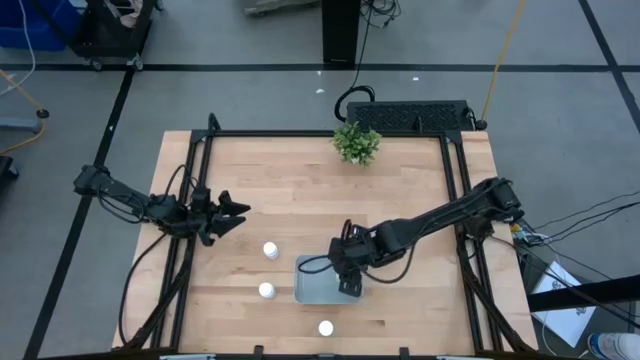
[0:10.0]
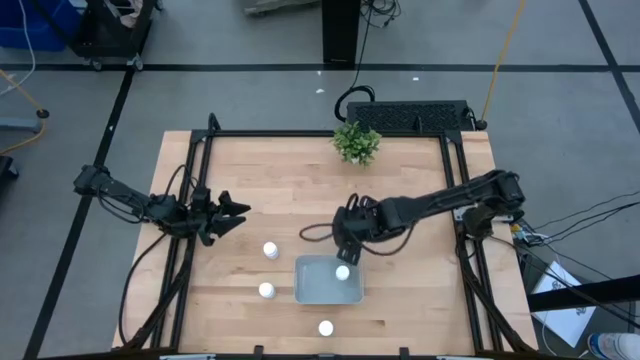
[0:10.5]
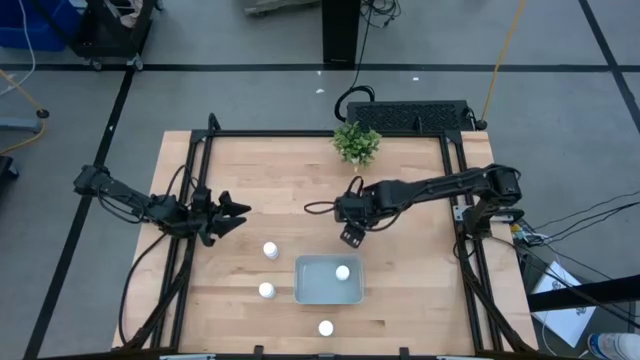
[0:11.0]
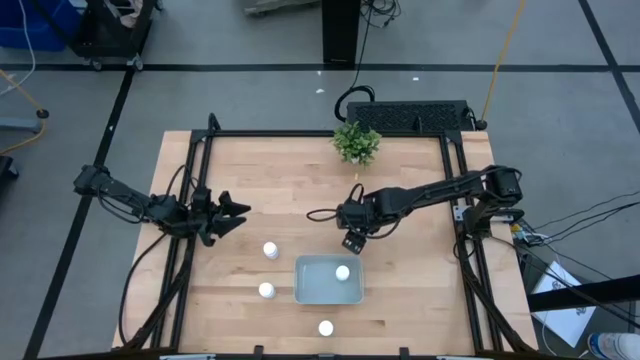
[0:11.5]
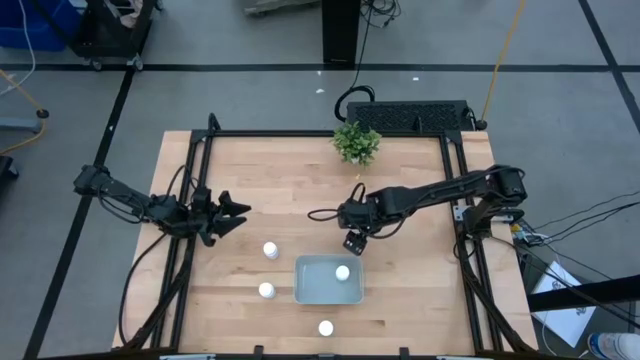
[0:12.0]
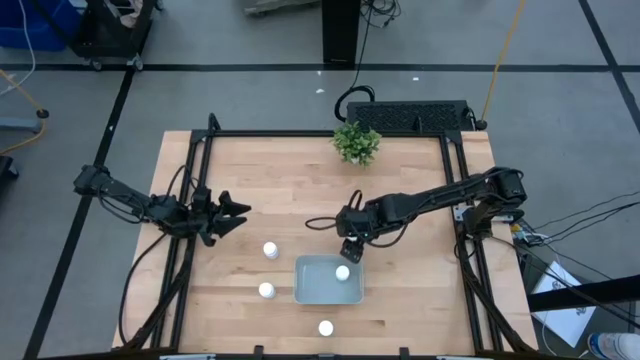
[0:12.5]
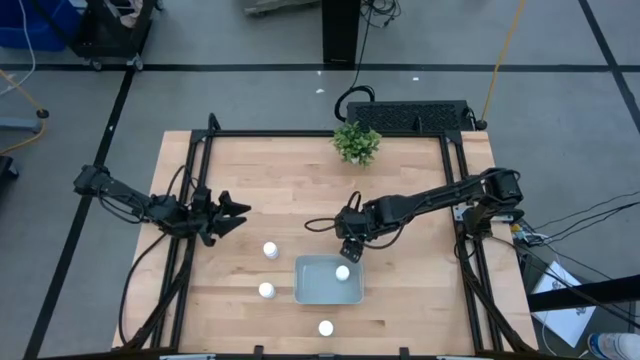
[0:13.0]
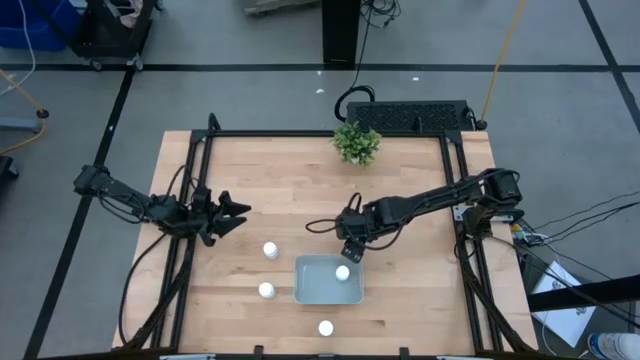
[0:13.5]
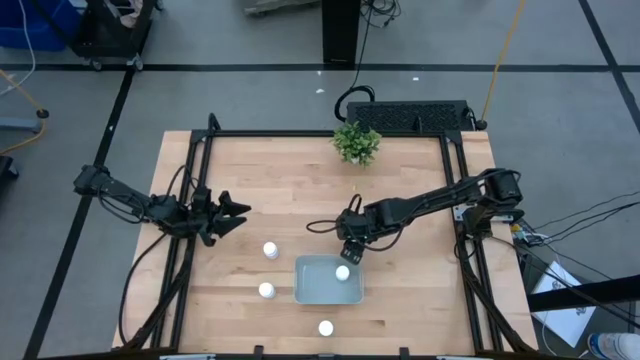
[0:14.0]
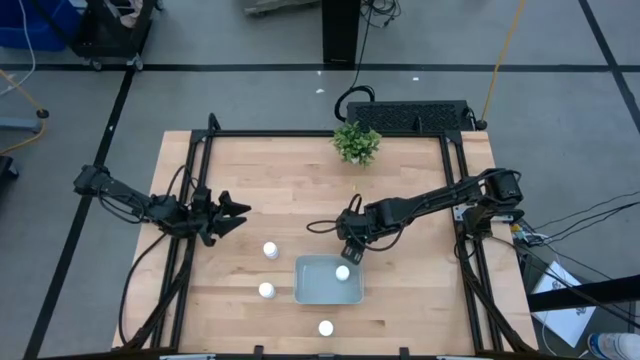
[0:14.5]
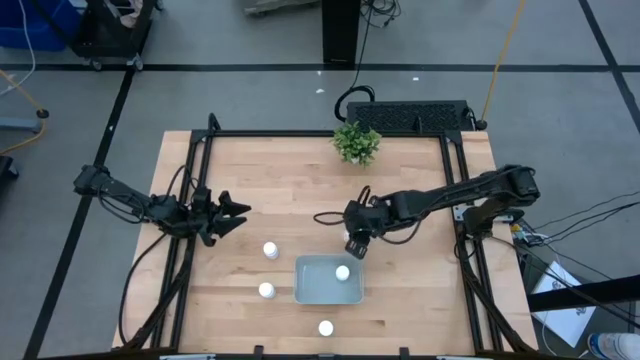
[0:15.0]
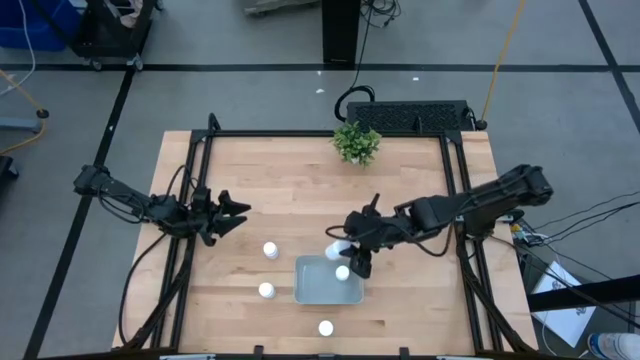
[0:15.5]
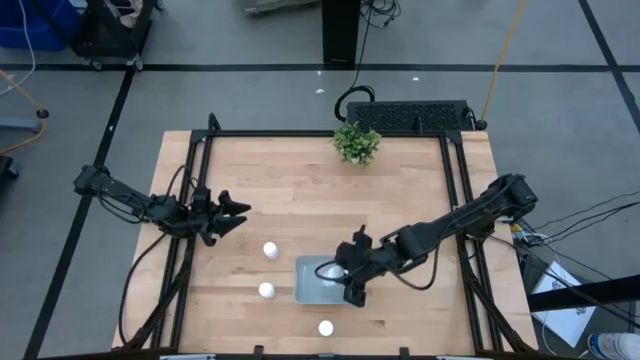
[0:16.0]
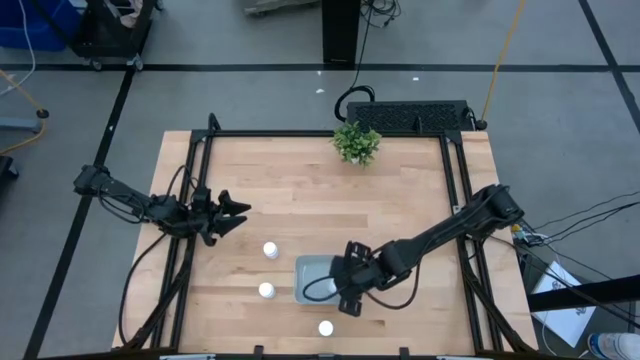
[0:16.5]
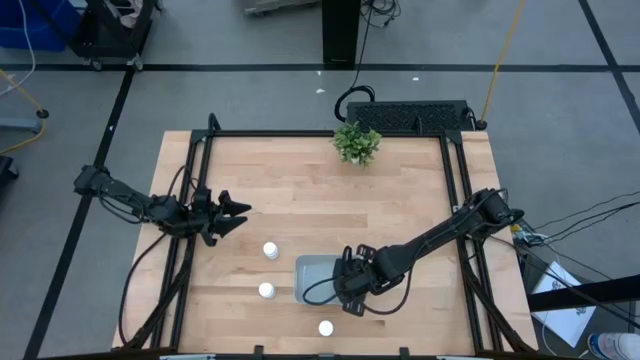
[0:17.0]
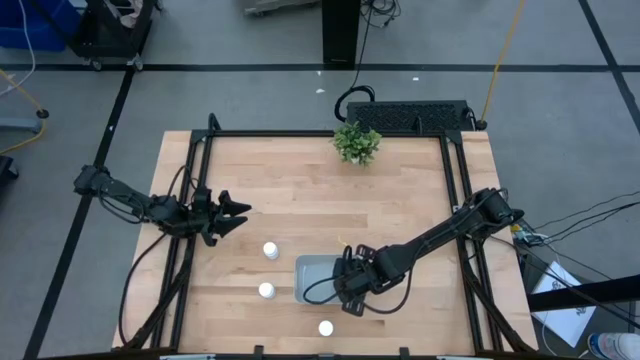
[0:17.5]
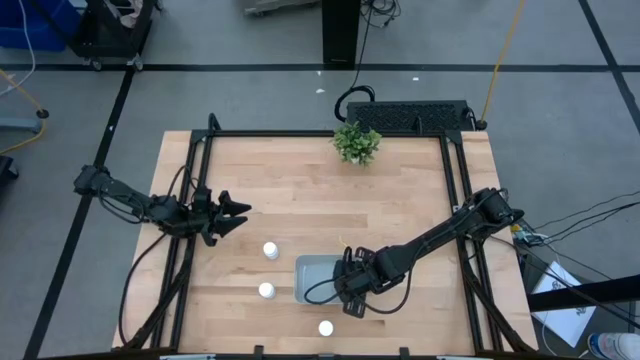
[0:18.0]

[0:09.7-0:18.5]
Task: Pick and place pill bottles into a basket
Put the white pill bottle into the gray bin

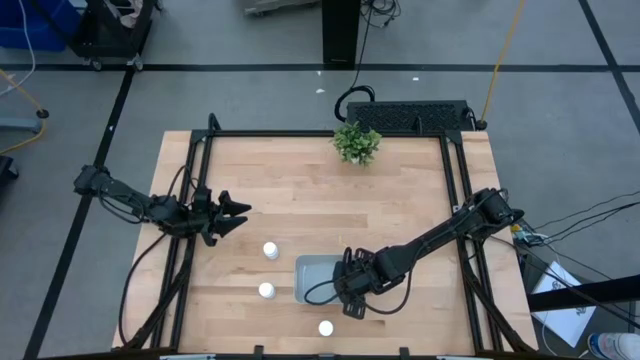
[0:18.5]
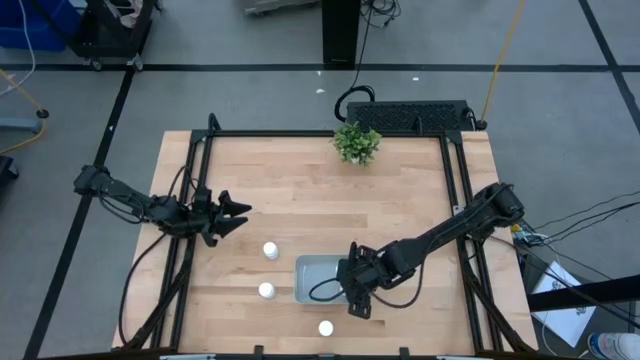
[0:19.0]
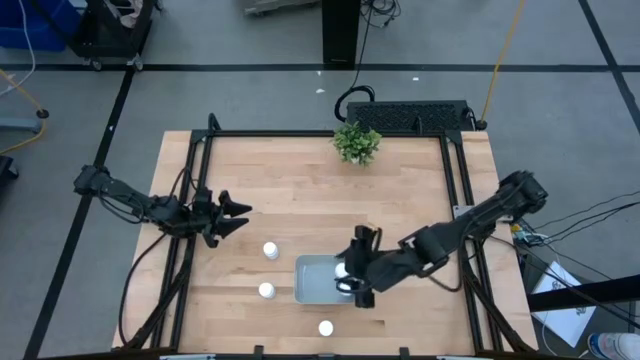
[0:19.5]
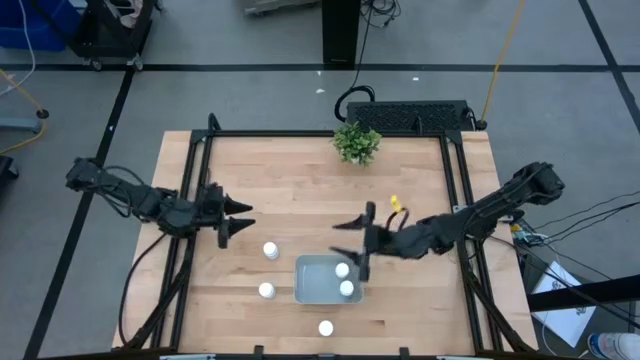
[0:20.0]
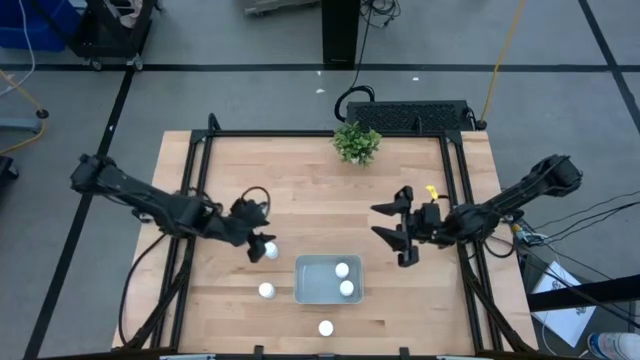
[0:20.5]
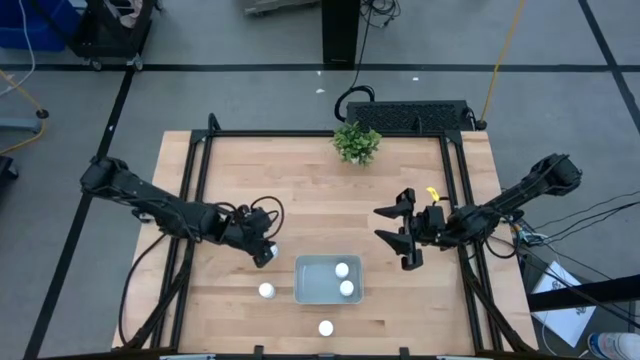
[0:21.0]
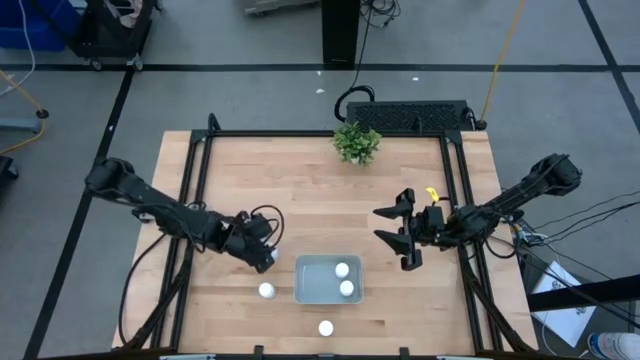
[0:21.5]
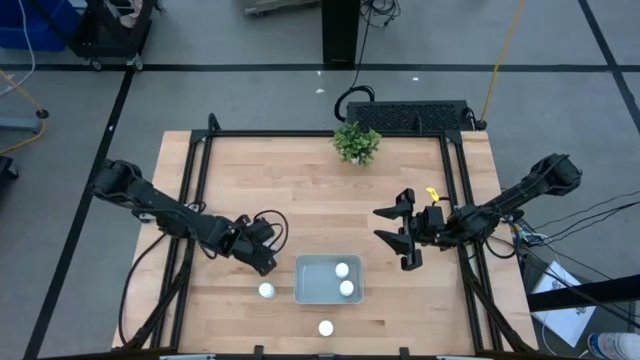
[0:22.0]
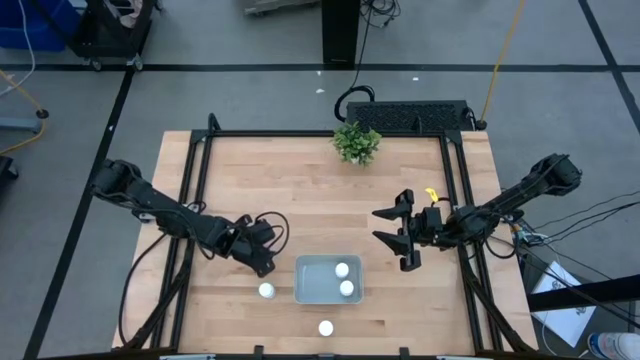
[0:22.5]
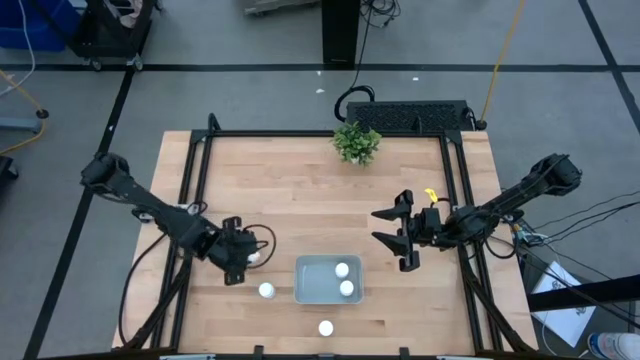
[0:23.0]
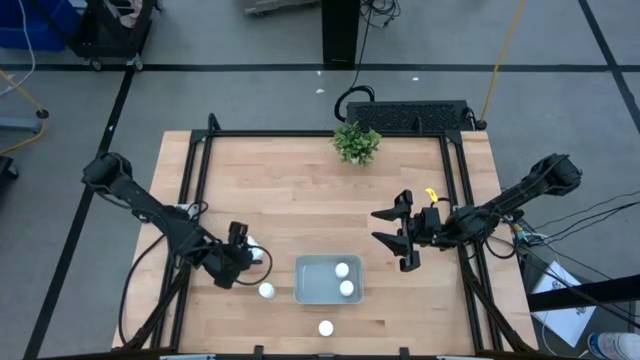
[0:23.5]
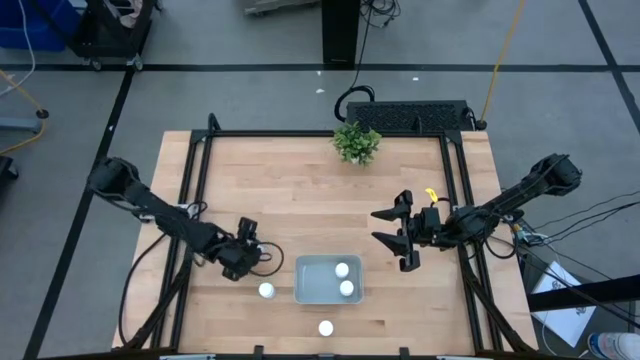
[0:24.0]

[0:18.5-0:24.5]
Put the white pill bottle into the gray bin

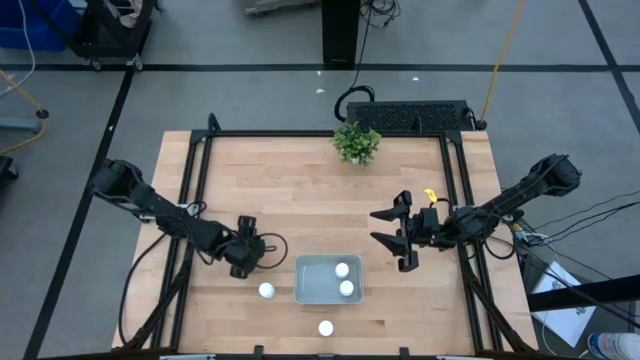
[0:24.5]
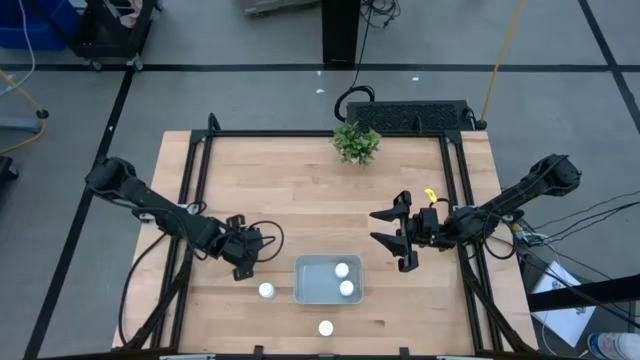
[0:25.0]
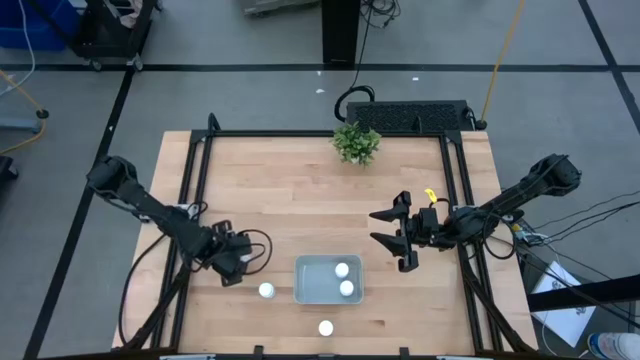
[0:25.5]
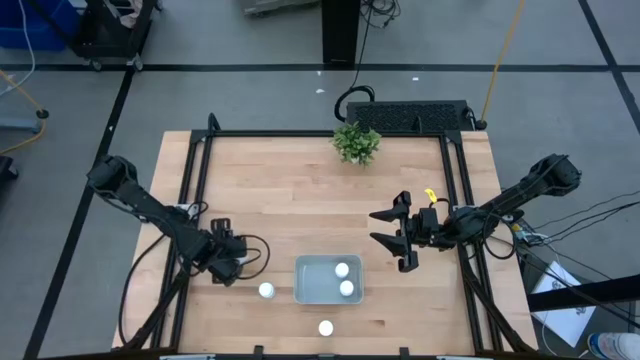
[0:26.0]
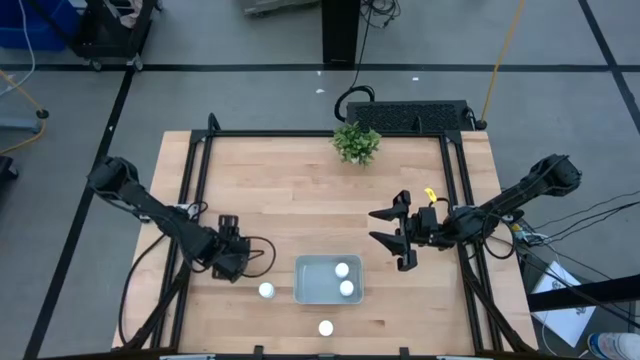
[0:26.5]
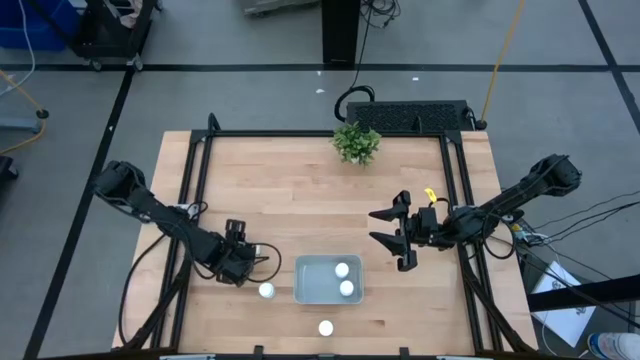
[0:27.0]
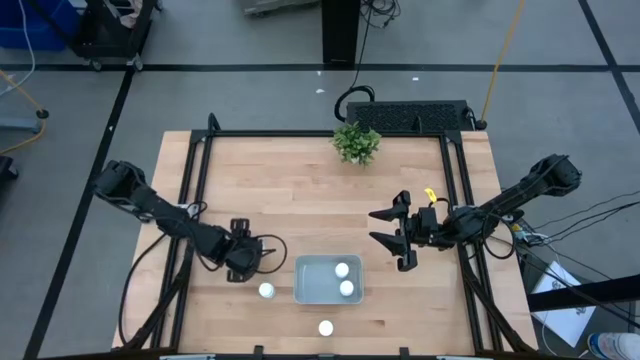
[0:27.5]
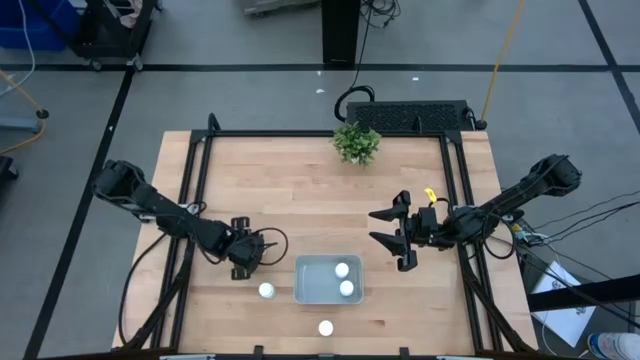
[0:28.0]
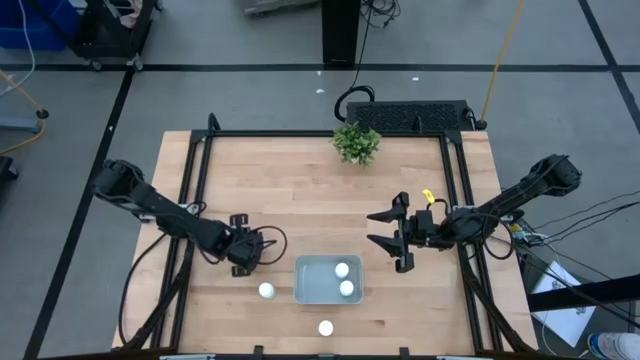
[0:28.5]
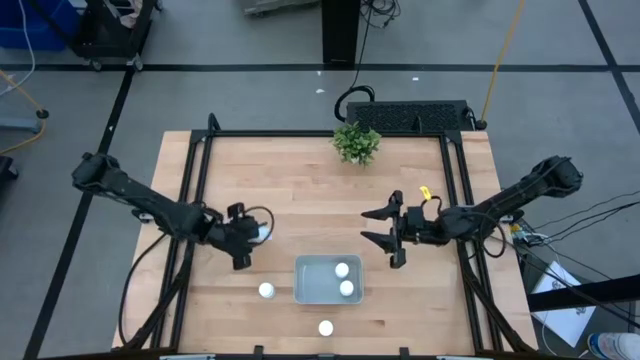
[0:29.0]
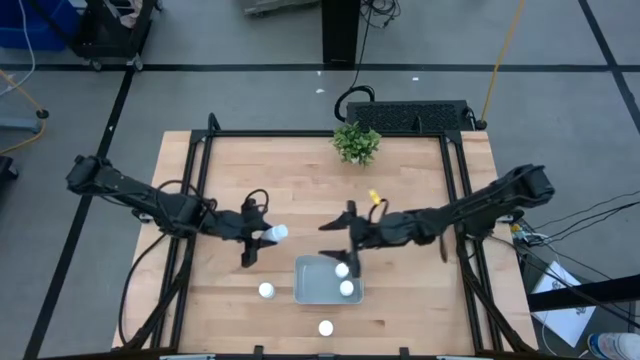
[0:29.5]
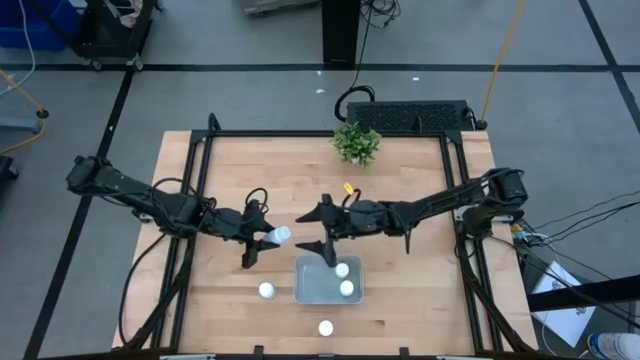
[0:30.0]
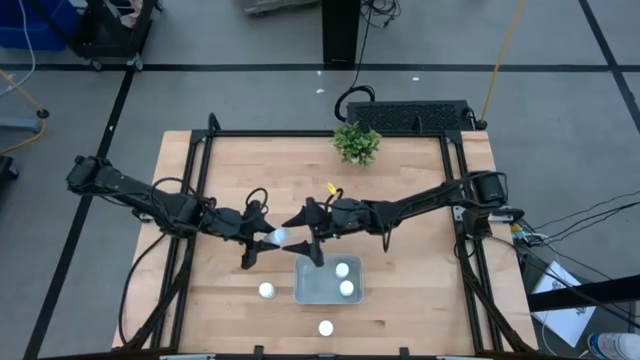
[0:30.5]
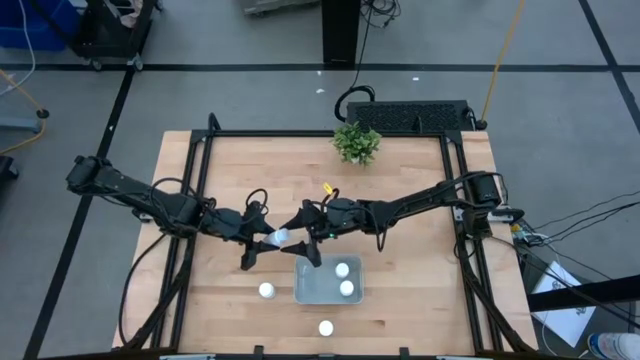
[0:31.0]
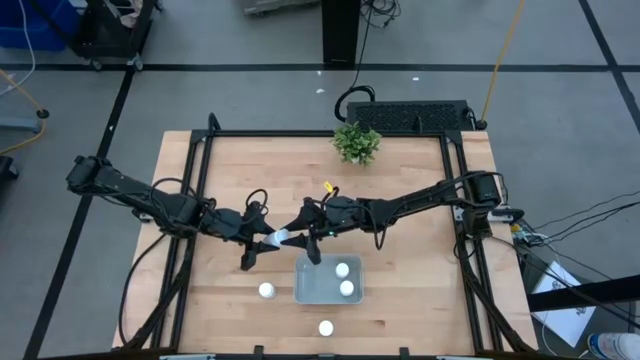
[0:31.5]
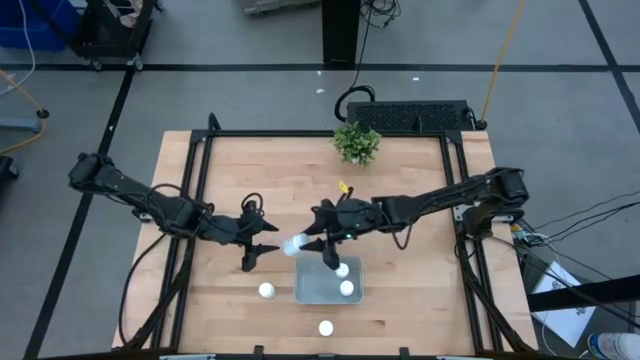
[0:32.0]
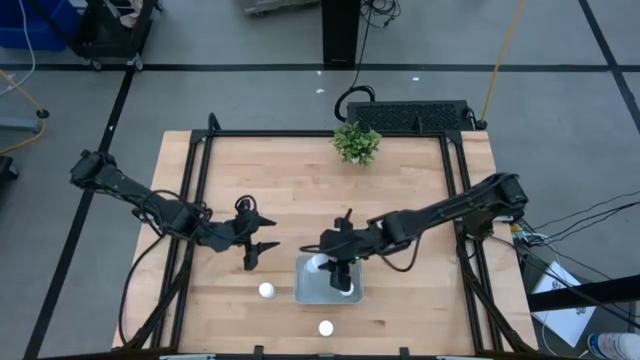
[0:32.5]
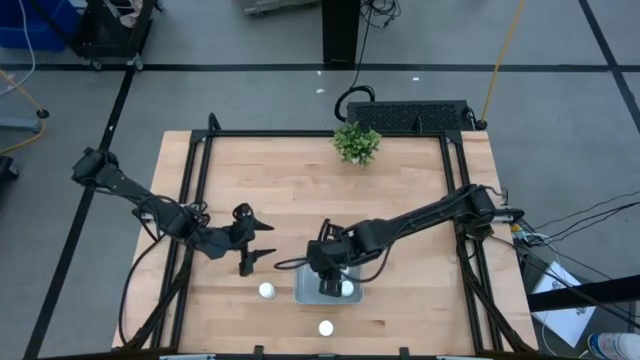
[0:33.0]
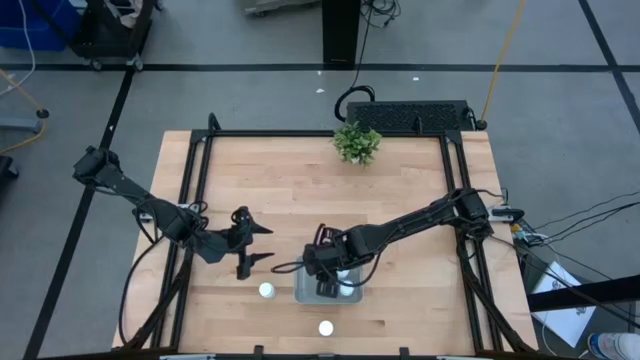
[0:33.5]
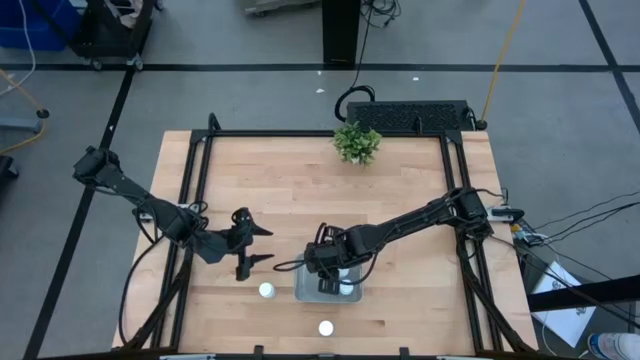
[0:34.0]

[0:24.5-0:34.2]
Put the white pill bottle into the gray bin
